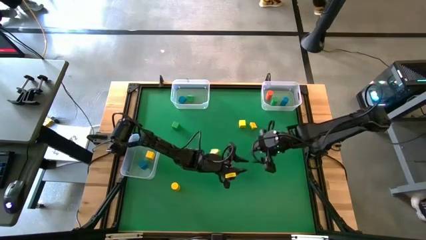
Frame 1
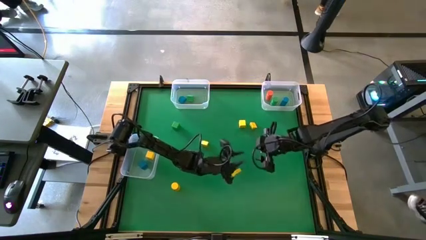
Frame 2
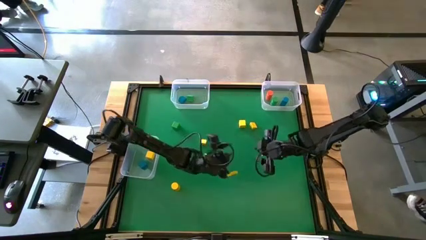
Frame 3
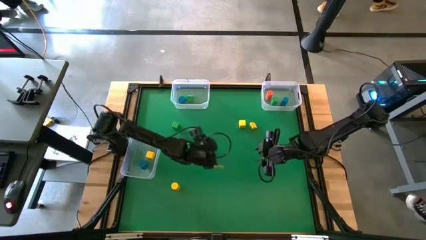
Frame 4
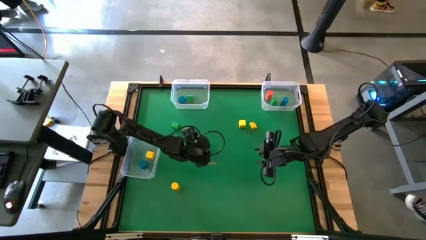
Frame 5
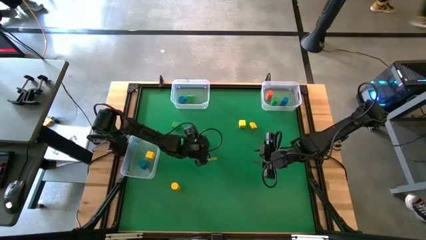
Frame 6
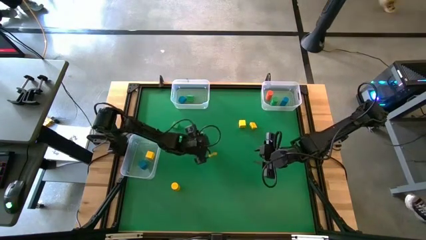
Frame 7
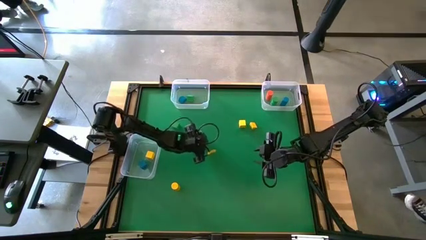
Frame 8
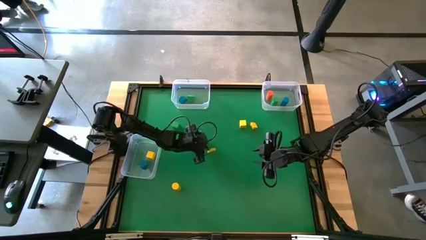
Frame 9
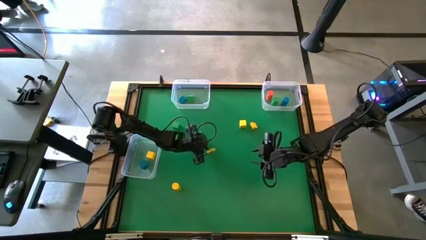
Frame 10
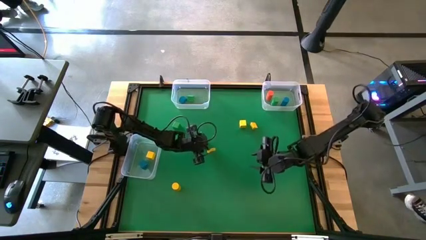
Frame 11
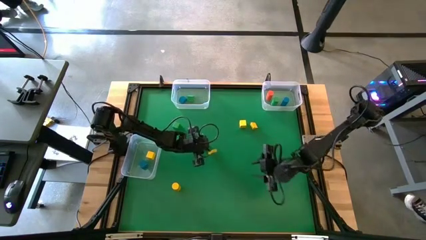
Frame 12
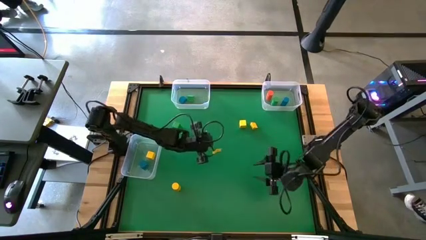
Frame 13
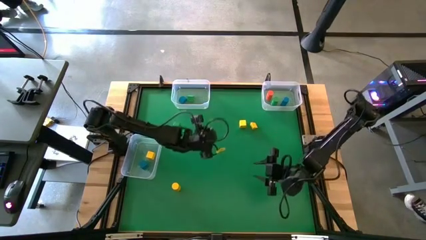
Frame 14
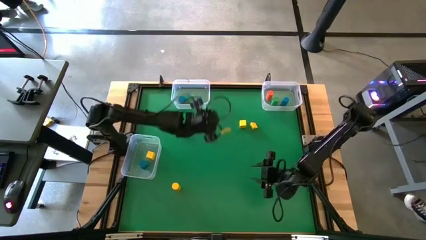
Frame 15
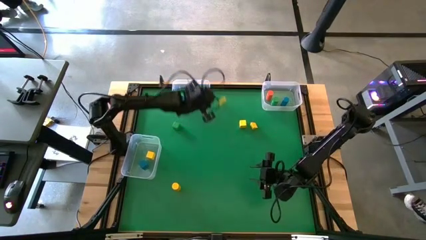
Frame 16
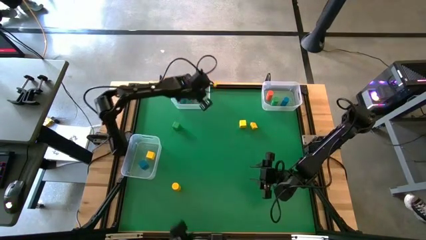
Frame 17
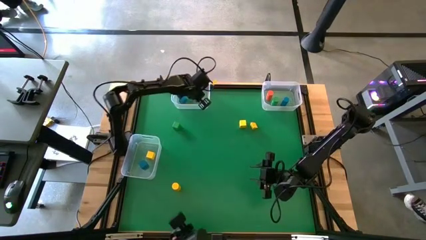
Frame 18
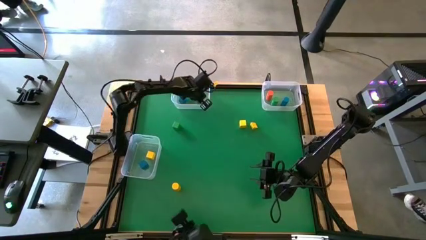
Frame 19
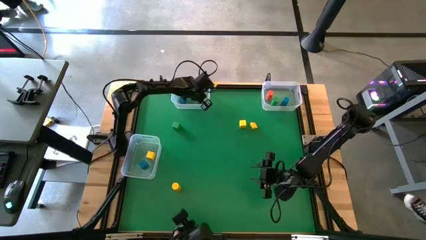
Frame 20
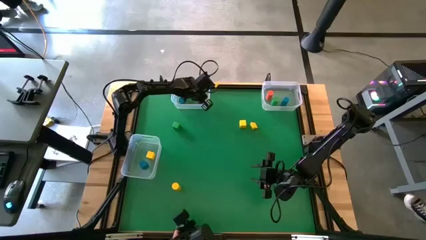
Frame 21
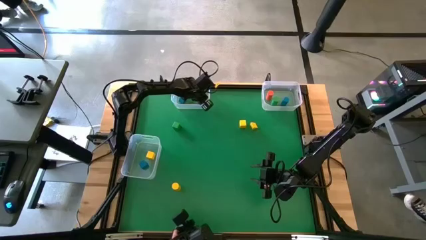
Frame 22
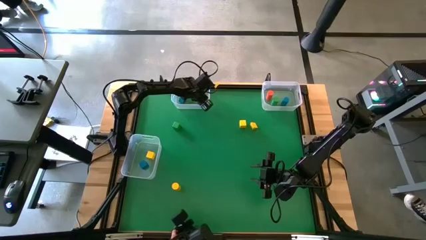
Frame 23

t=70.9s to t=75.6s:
Task: Sort blocks by size
Put the yellow triangle block into the top left transparent bin

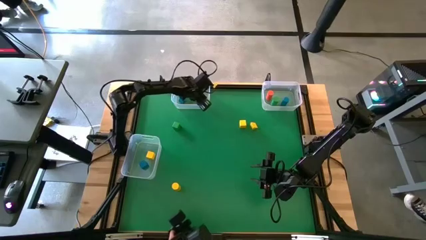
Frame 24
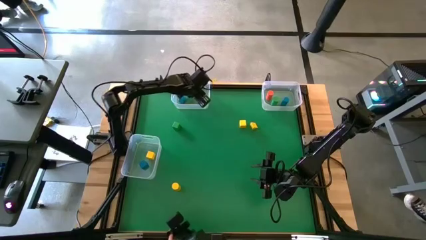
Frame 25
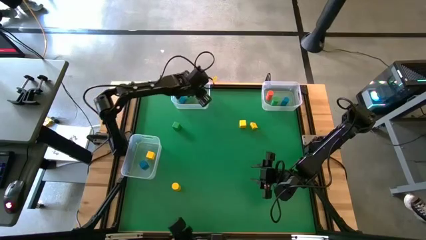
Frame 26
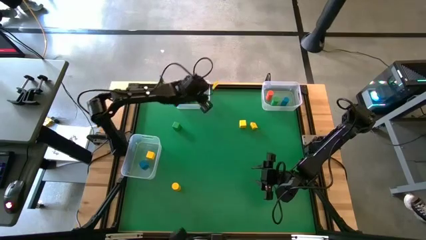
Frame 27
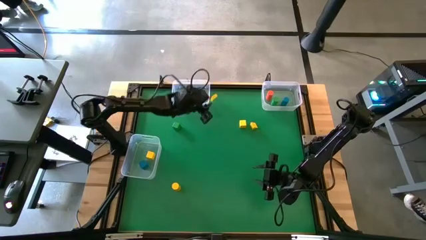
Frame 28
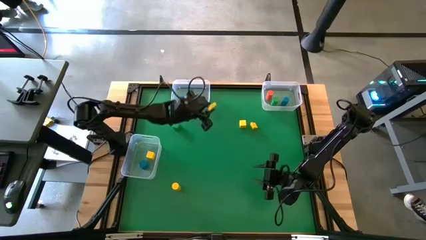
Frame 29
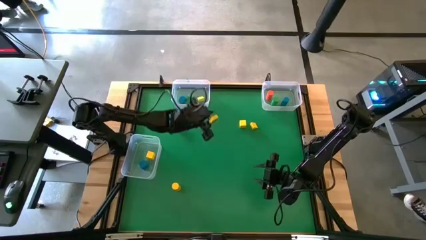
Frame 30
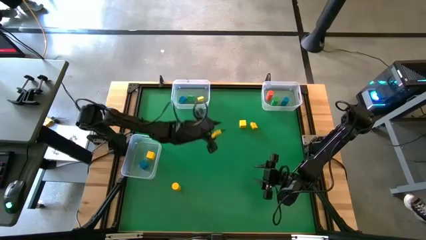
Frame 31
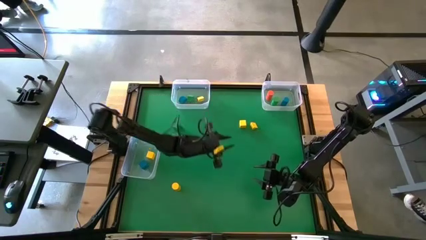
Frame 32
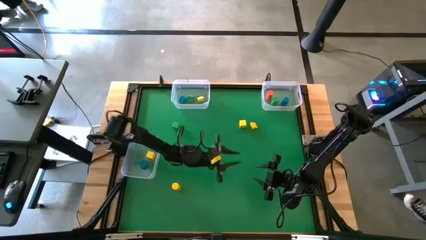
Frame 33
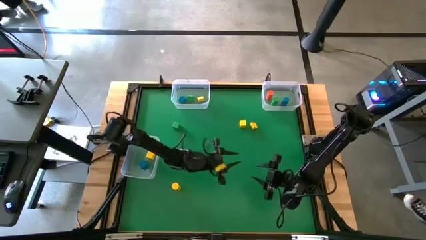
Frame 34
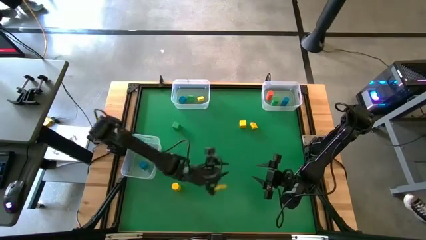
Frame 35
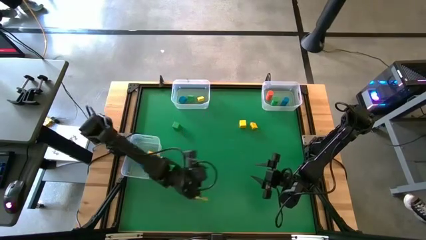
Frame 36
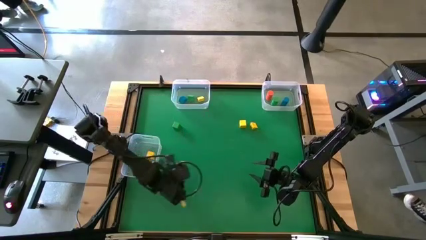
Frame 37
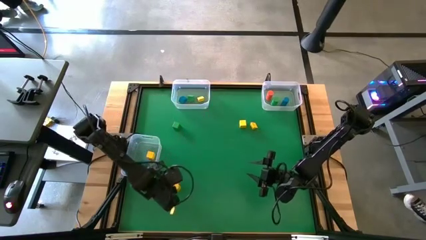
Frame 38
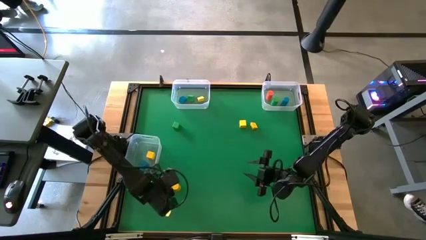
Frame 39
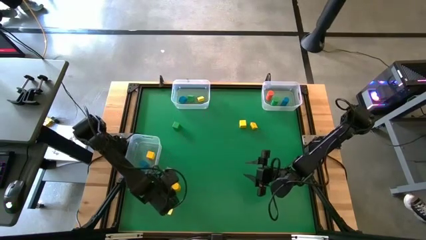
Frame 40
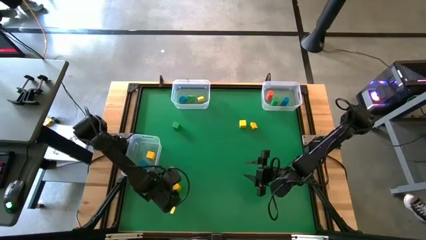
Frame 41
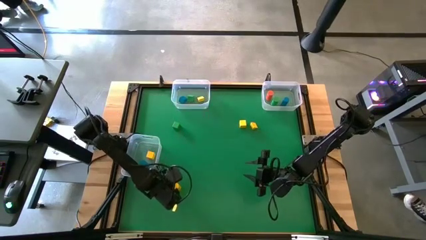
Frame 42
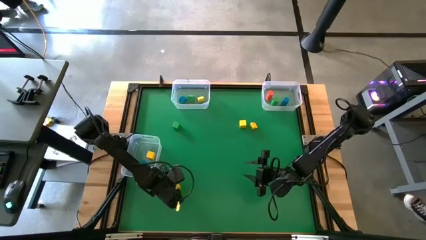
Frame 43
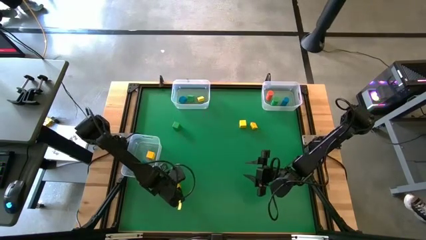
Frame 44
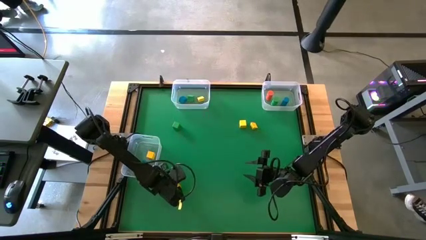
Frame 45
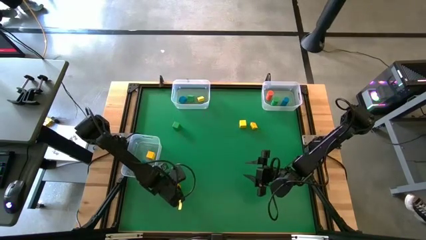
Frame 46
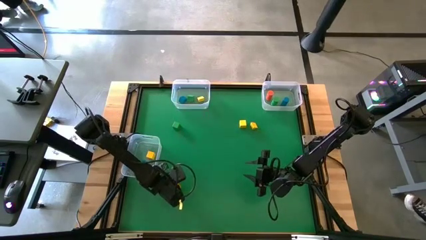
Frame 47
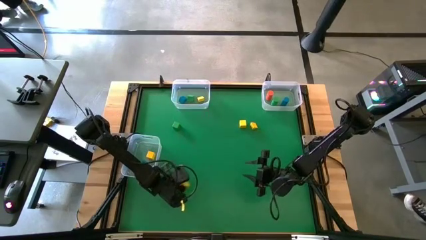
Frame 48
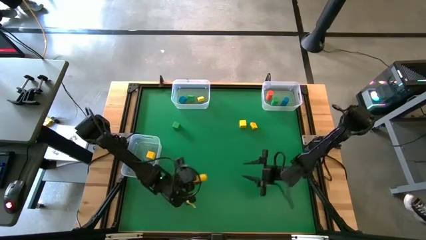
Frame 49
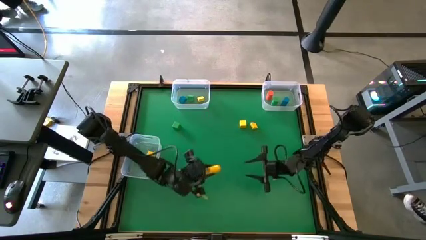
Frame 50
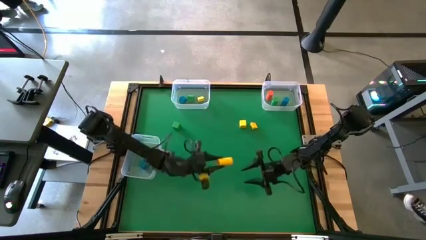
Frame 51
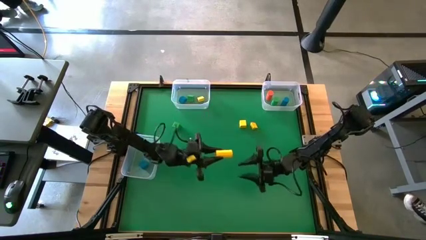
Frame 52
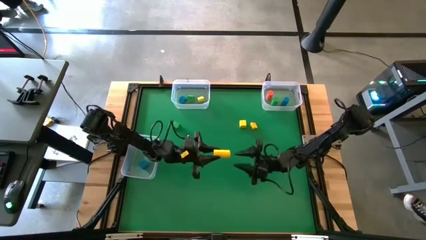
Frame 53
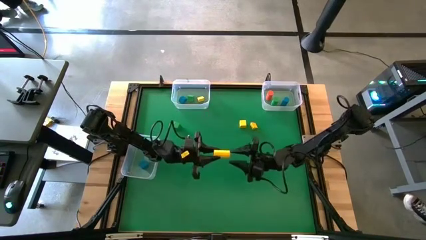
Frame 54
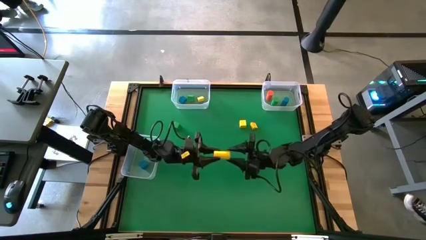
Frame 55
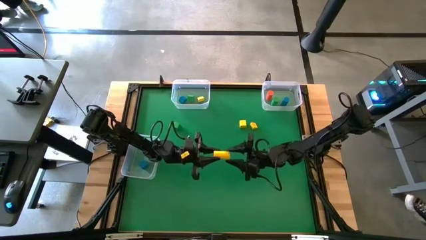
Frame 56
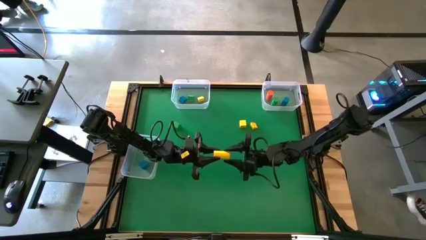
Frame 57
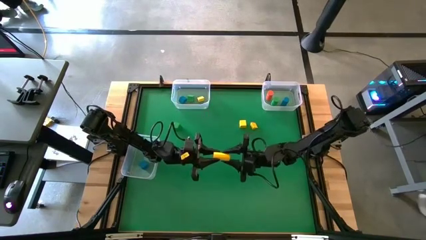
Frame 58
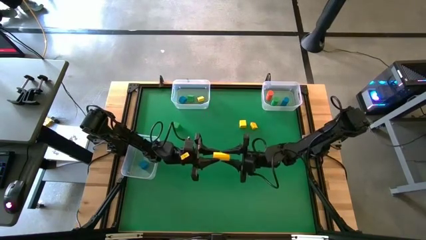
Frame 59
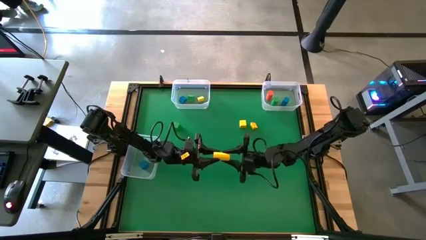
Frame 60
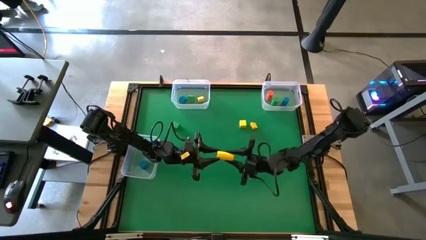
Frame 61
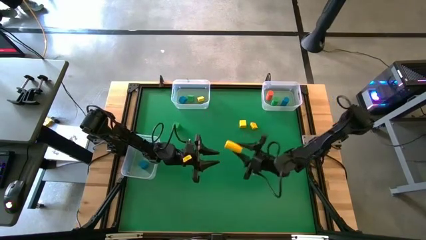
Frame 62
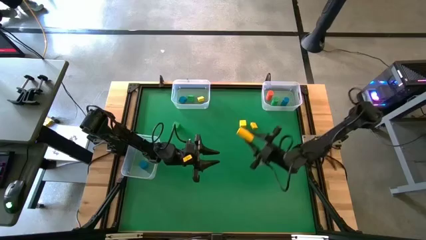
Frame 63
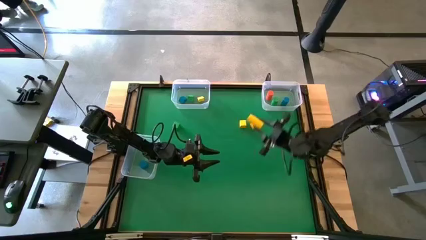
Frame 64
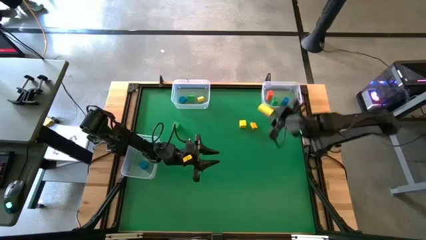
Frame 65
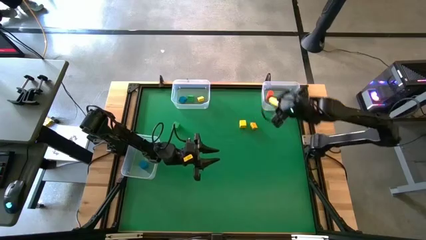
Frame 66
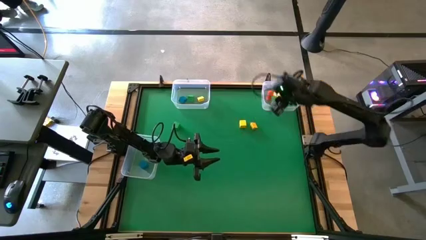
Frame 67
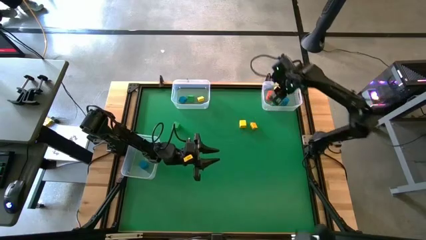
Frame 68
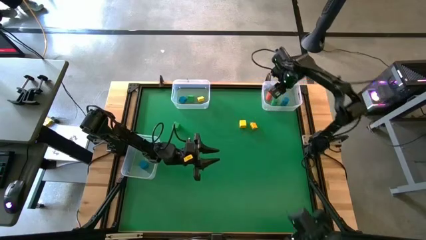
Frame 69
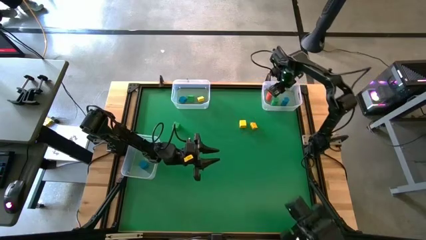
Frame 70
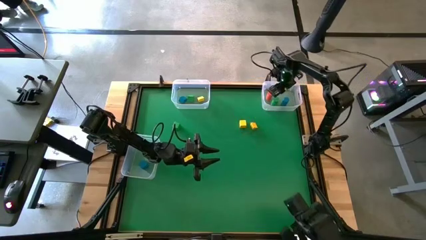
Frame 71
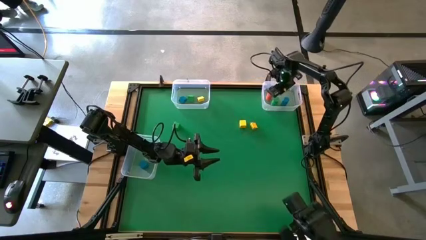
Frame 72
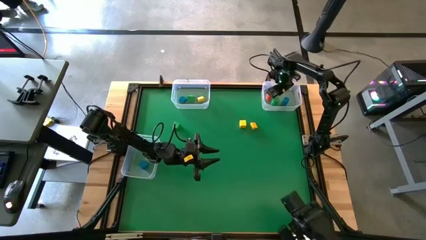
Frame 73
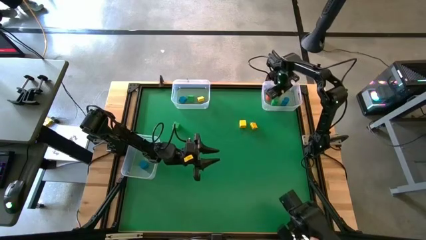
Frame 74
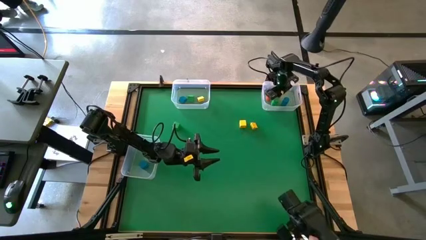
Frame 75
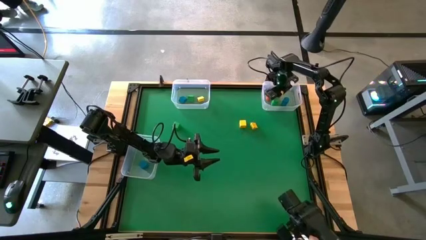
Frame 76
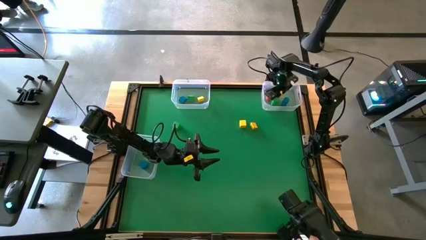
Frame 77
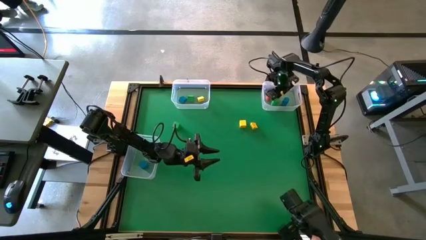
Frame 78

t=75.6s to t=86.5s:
Put the yellow cylindrical block into the top right transparent bin
